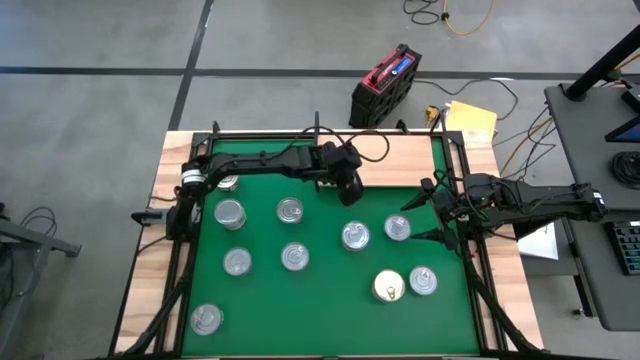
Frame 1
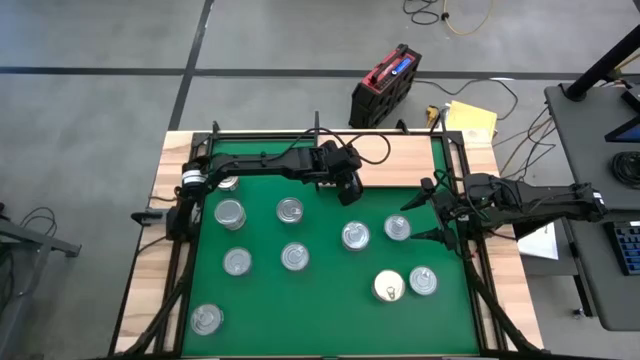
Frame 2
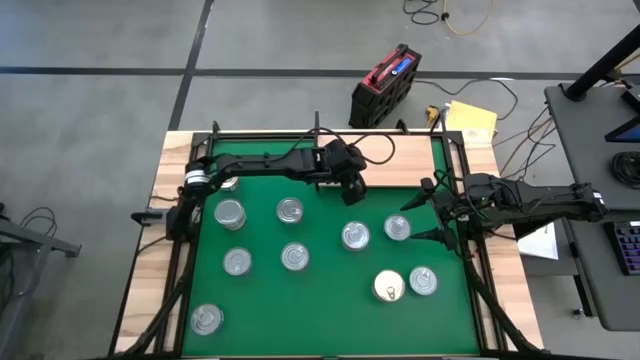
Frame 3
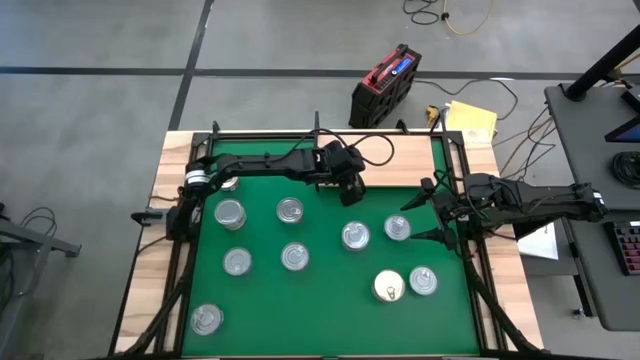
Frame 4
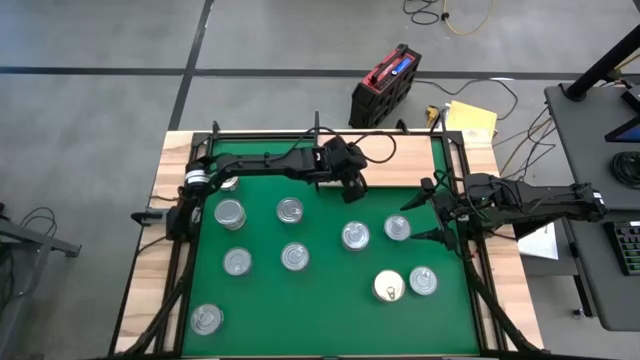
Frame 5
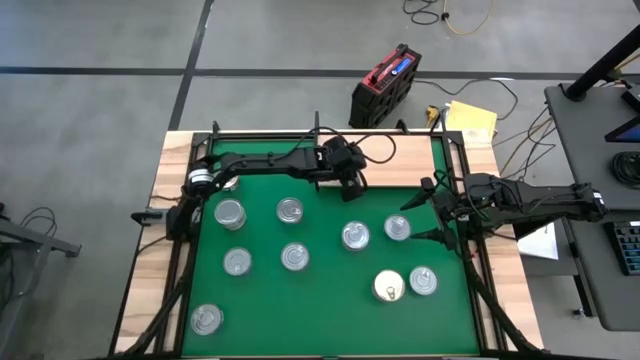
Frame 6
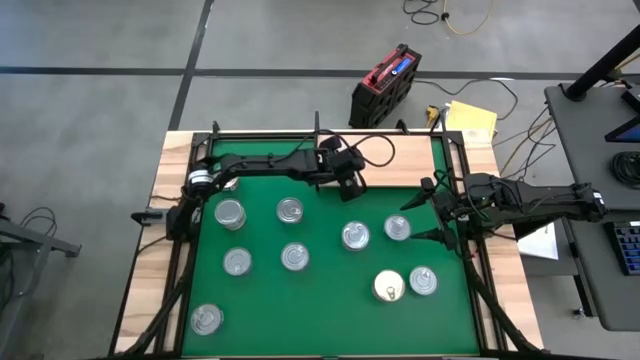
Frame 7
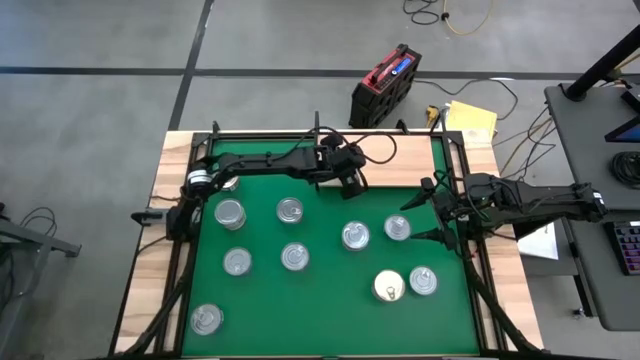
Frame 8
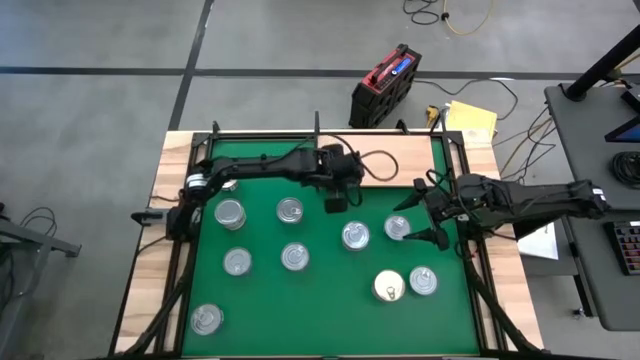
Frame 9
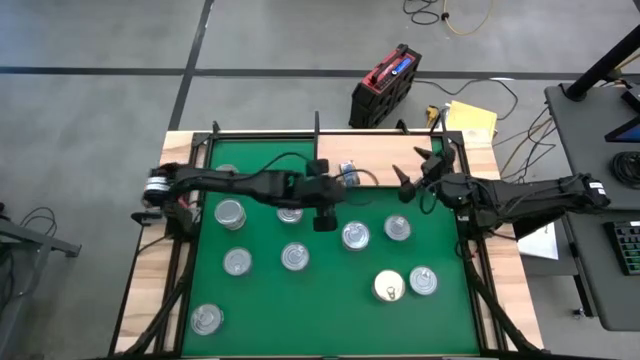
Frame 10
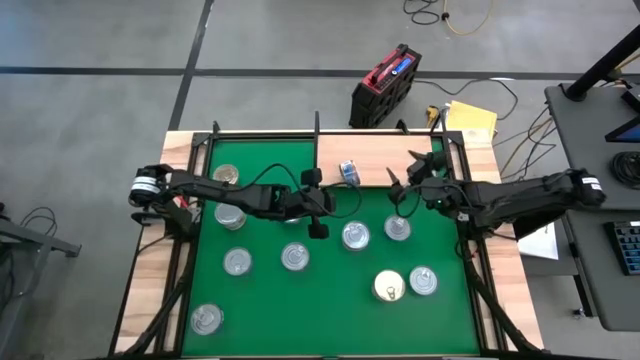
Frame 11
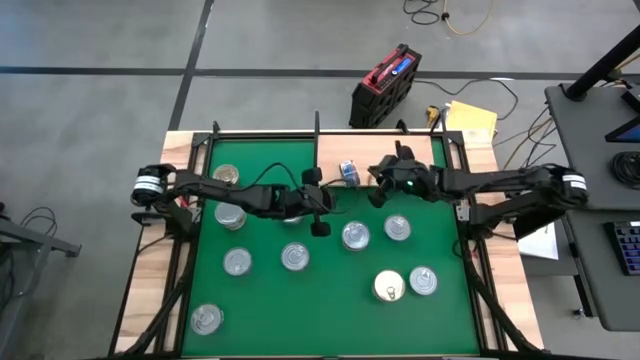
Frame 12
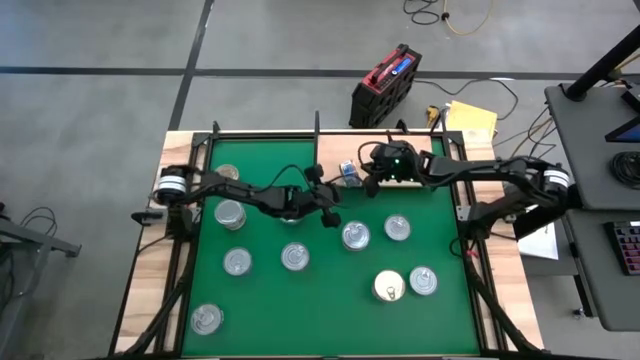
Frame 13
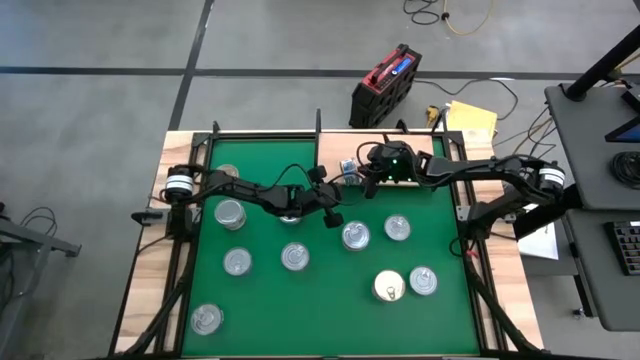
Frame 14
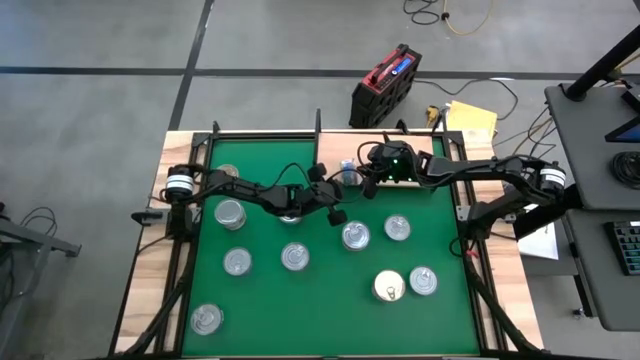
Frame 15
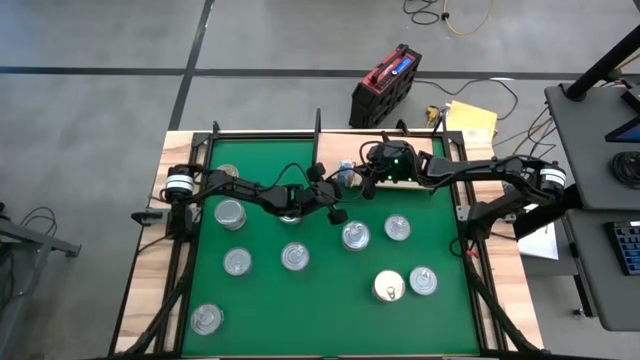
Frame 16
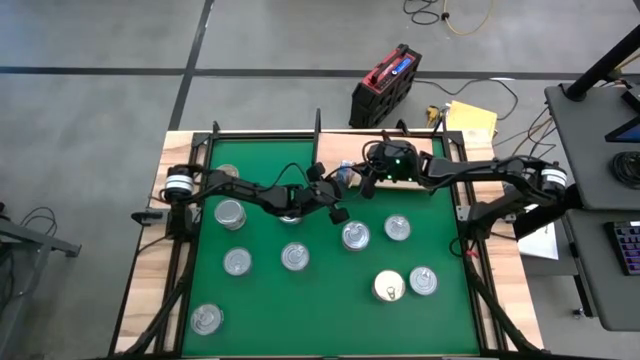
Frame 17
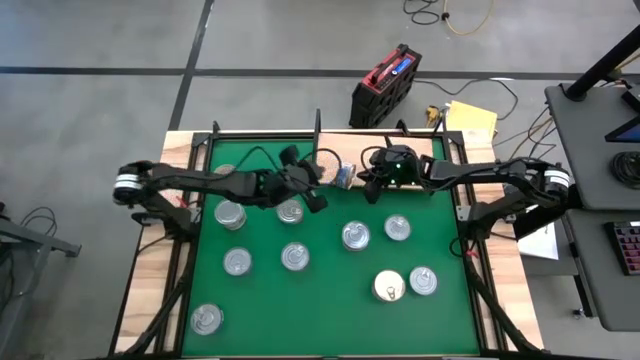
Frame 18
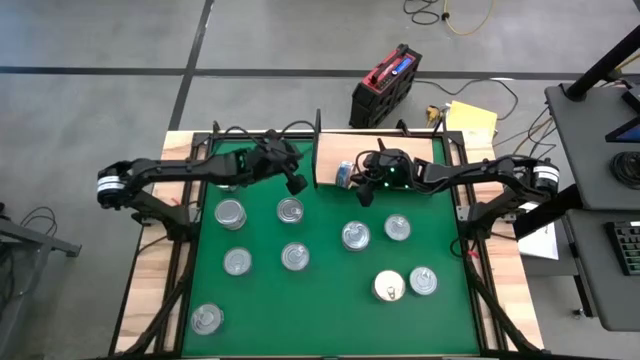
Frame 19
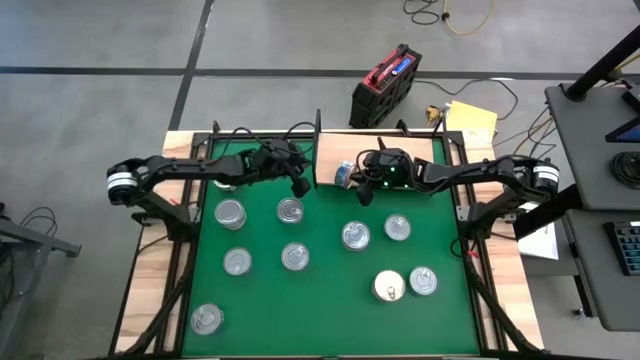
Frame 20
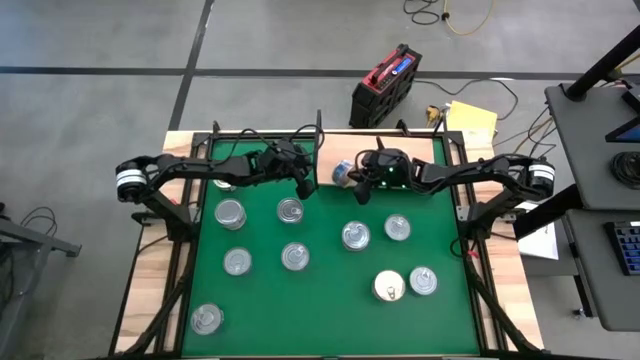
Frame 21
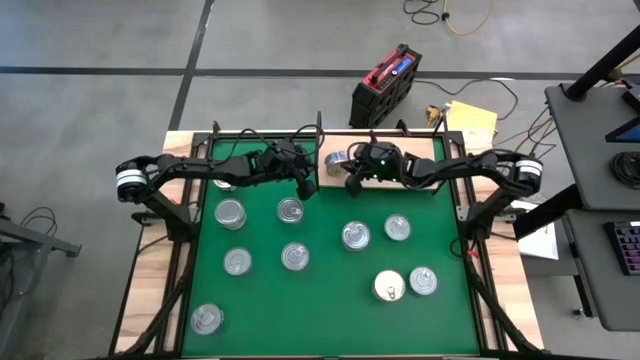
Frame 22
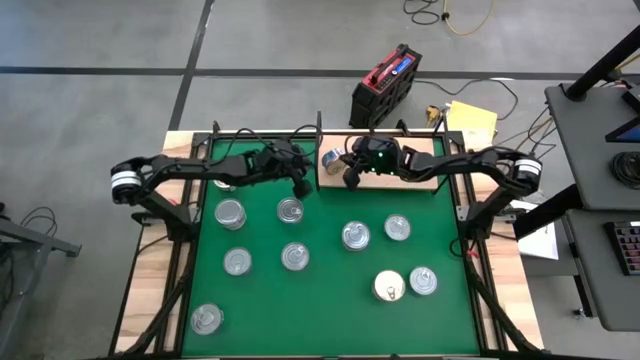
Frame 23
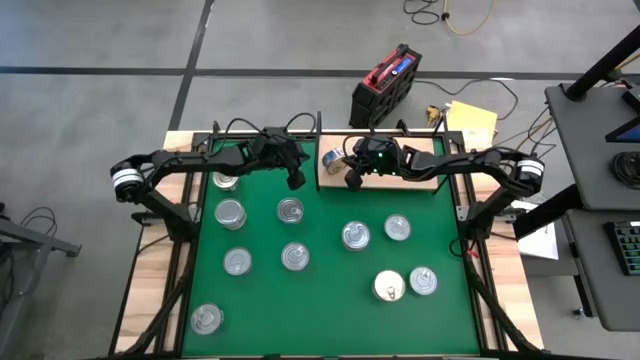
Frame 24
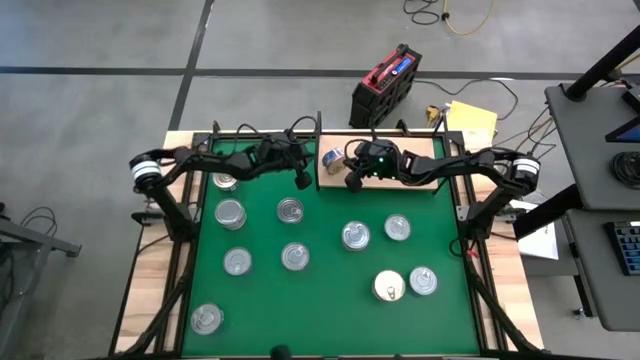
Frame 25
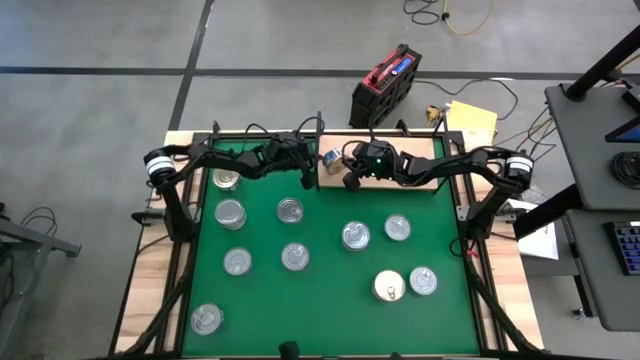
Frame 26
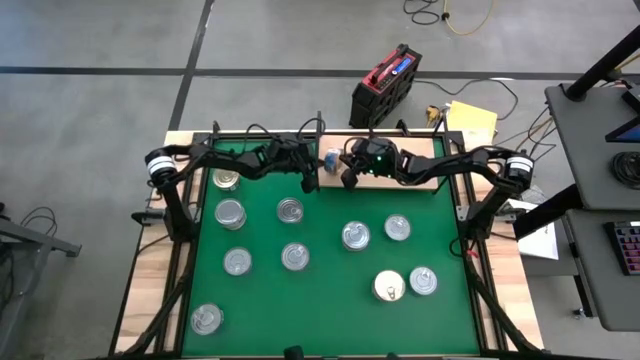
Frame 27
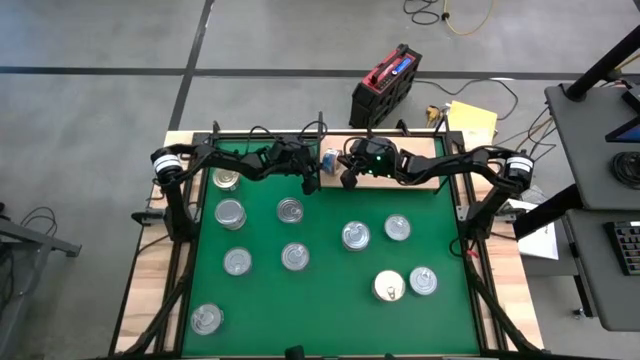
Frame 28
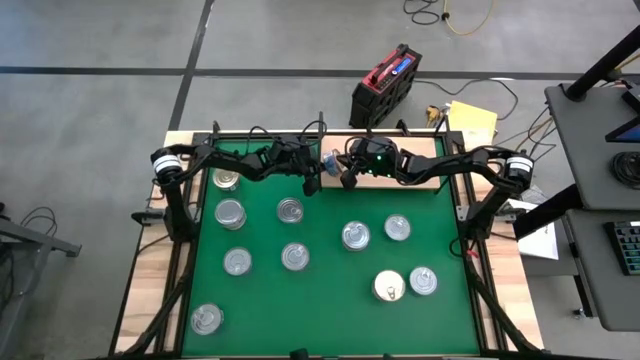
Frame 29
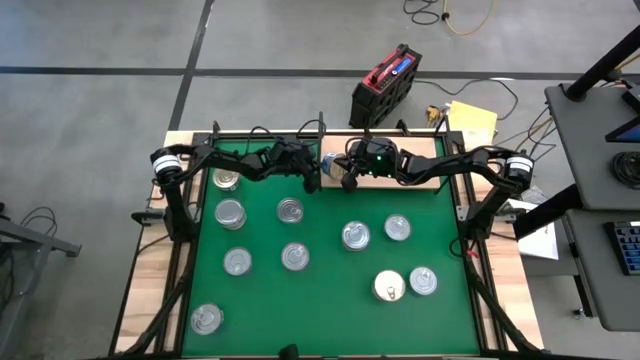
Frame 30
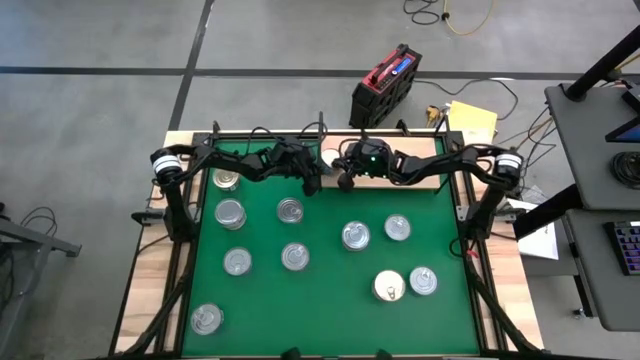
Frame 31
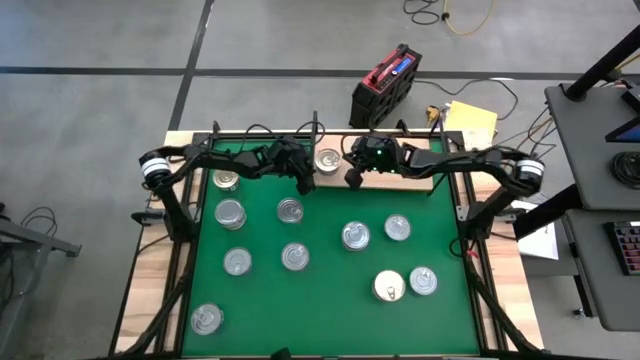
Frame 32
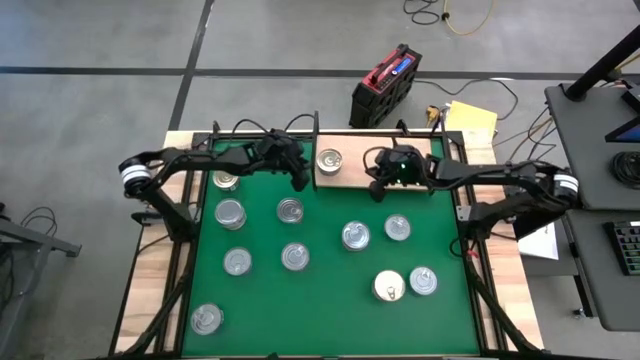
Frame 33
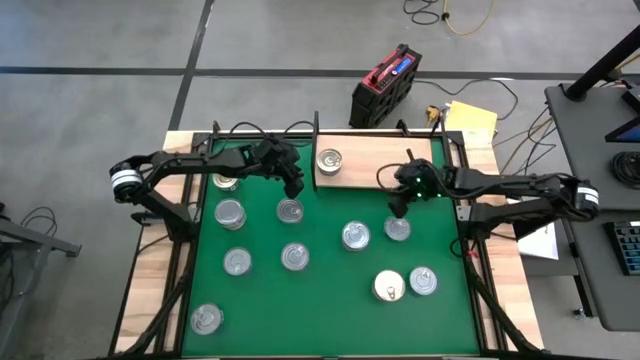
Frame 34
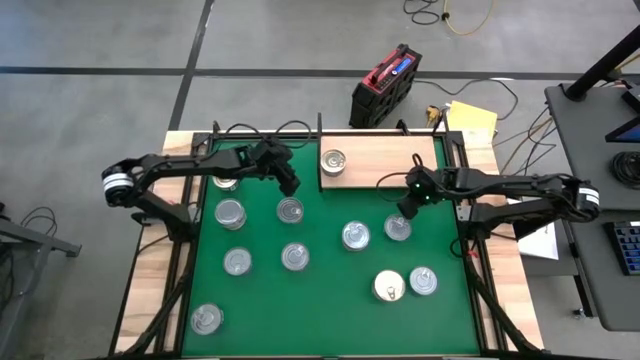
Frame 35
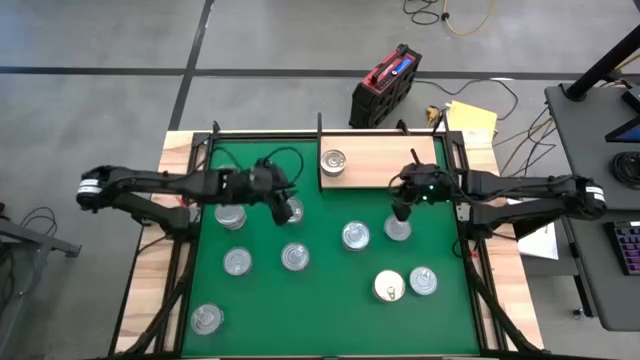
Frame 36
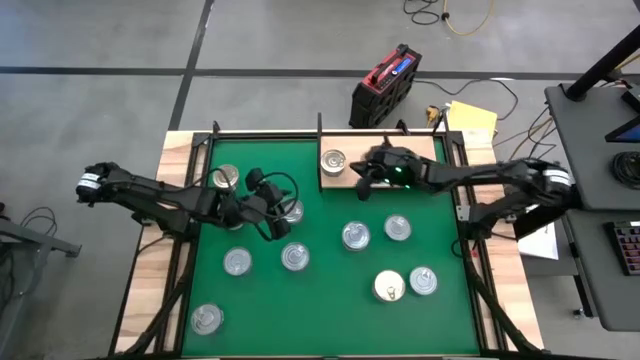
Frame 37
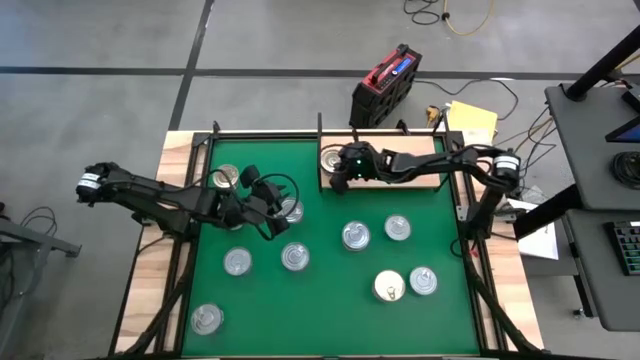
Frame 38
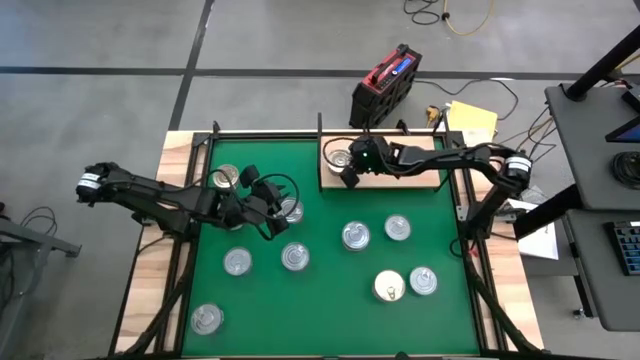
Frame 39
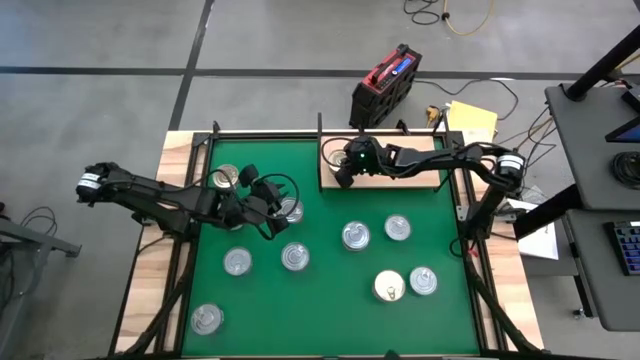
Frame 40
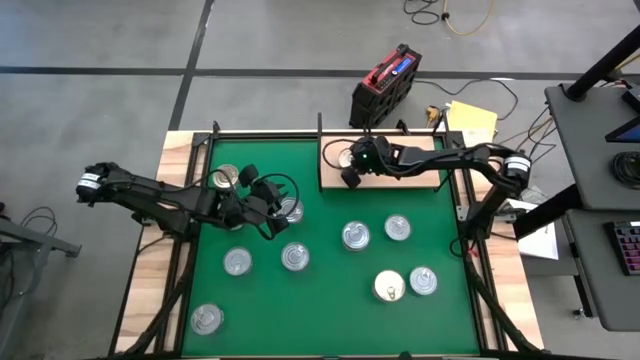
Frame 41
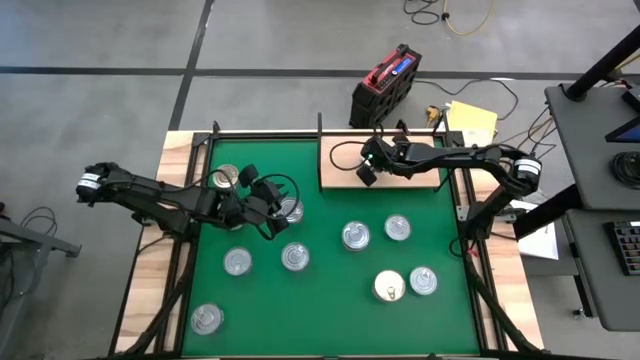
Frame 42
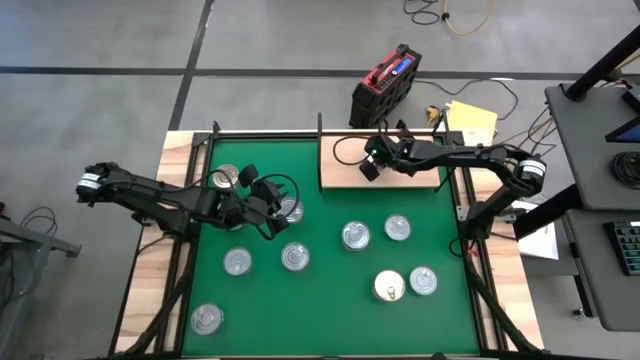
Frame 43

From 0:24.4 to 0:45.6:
Task: Stack canned seafood by type on shelf
Put the blue/pink tuna can on the shelf

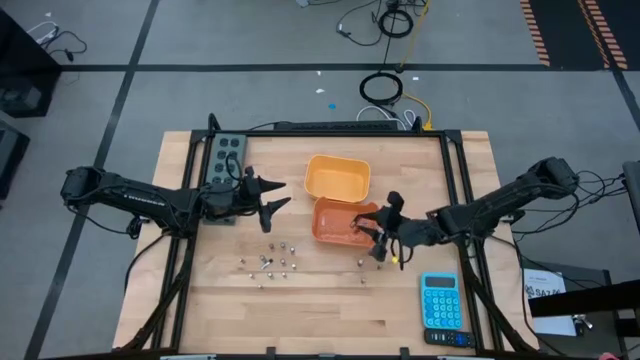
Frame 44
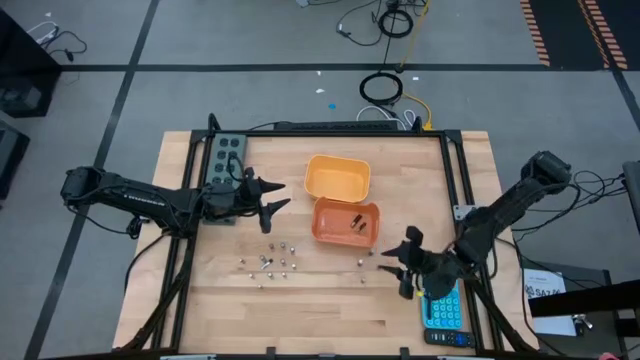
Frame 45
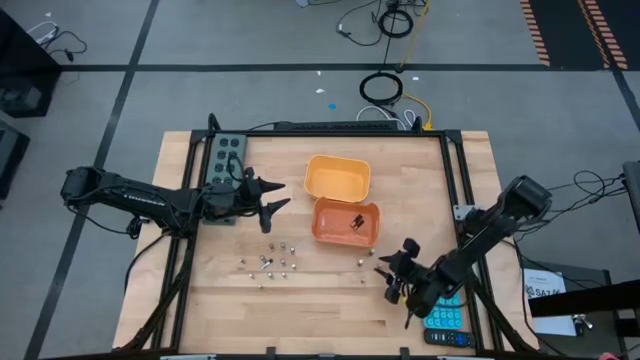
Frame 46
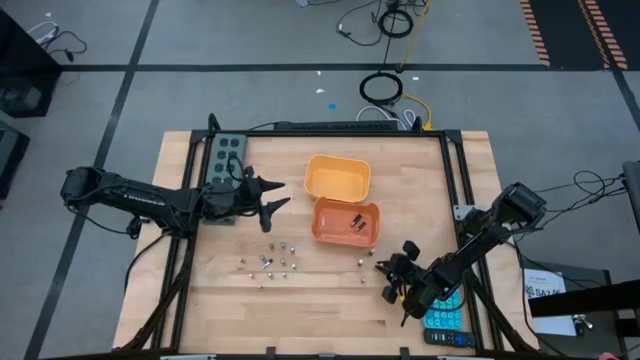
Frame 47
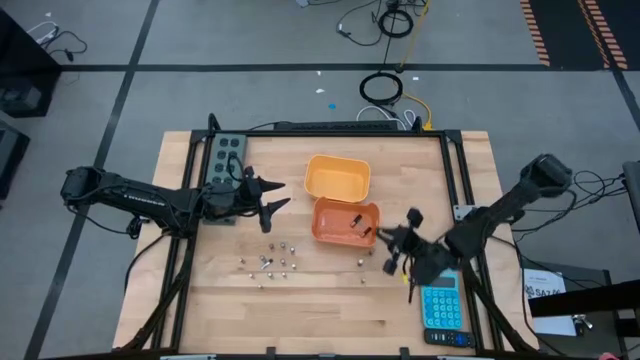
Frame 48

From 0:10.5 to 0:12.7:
Task: Sort batteries
Put the black battery into the orange bin
